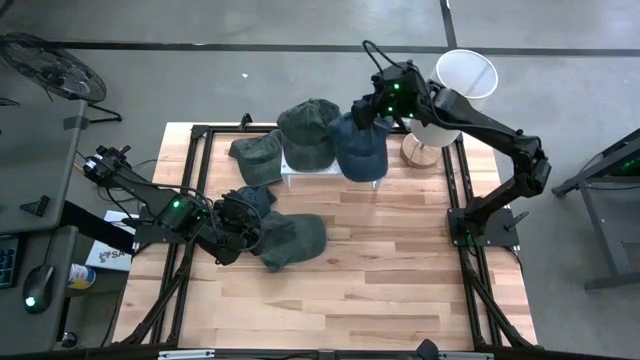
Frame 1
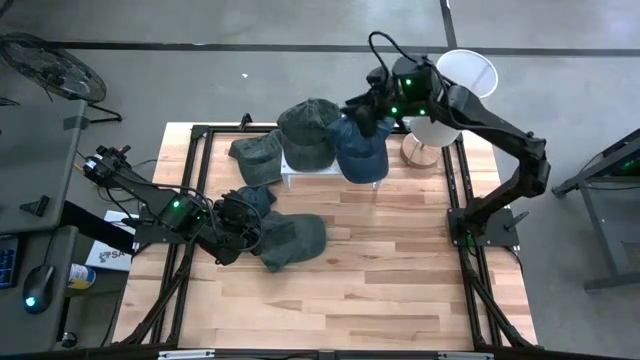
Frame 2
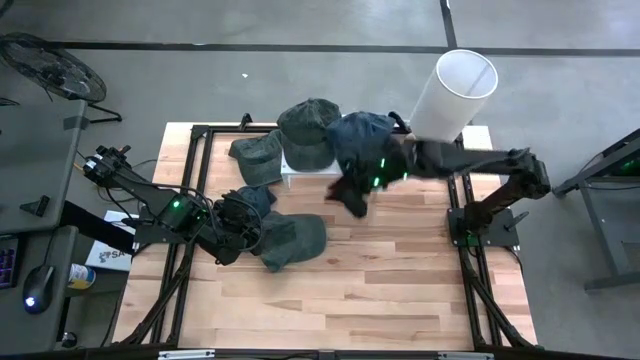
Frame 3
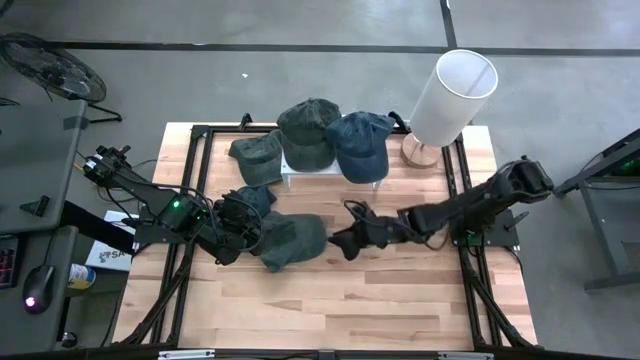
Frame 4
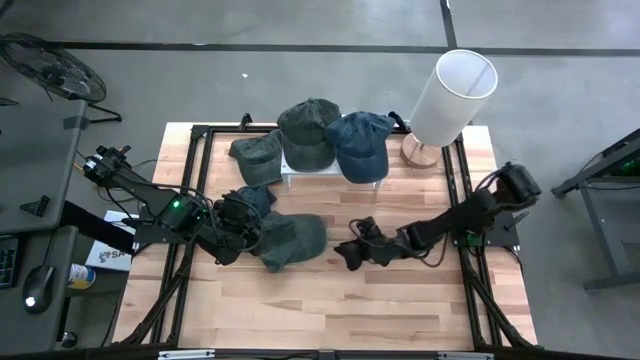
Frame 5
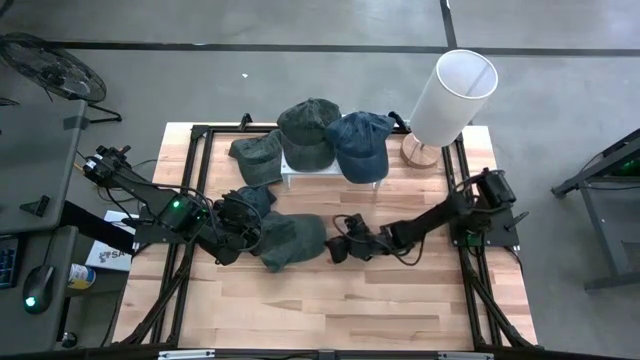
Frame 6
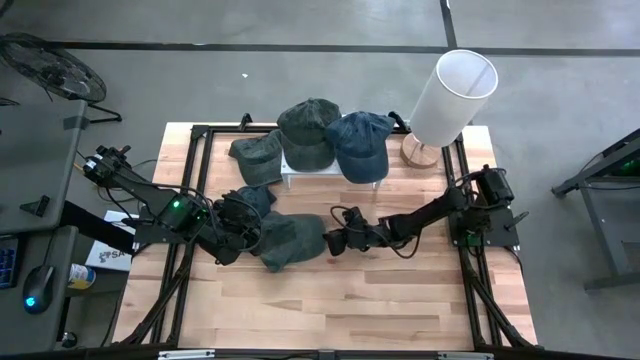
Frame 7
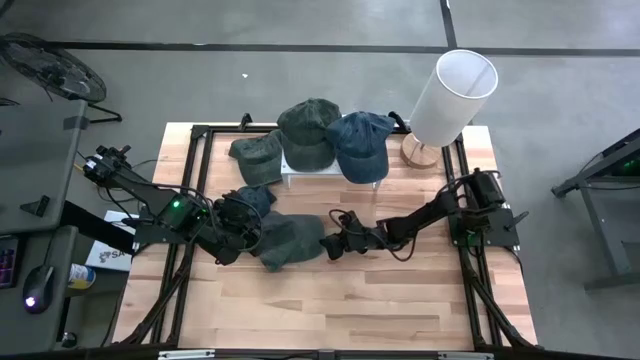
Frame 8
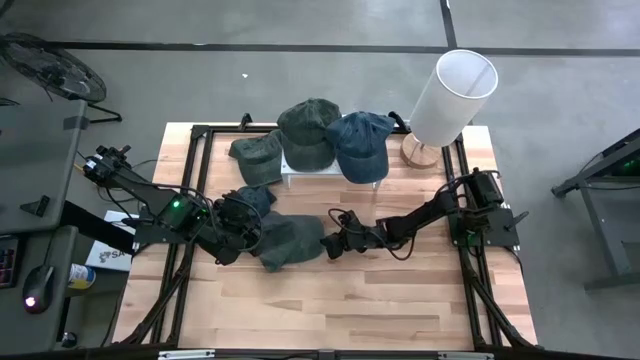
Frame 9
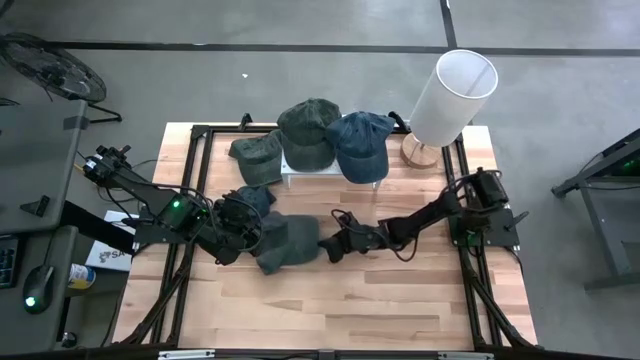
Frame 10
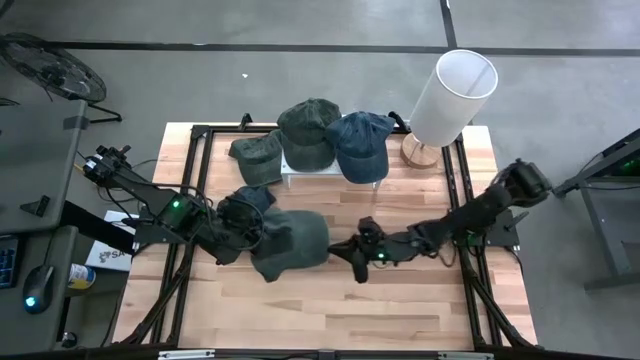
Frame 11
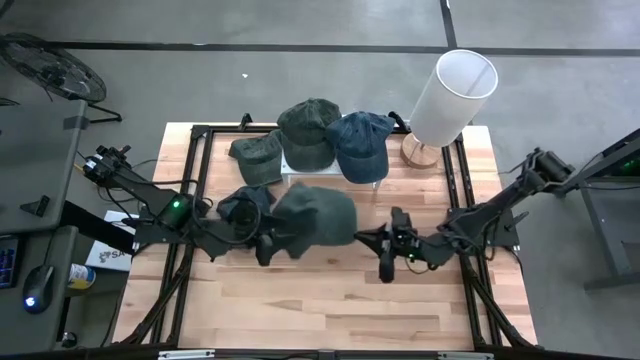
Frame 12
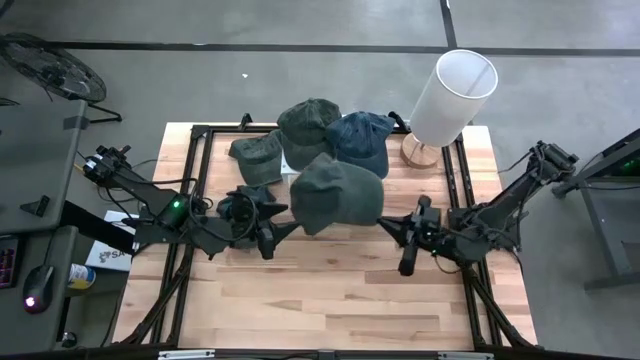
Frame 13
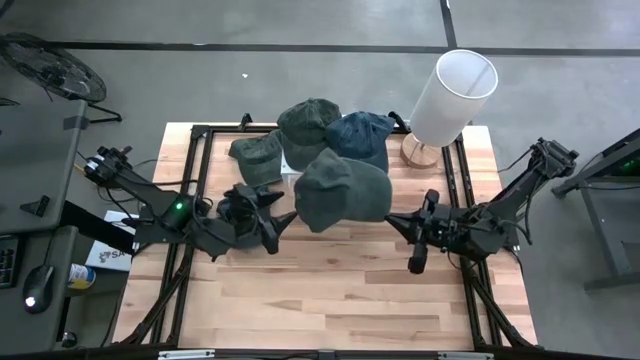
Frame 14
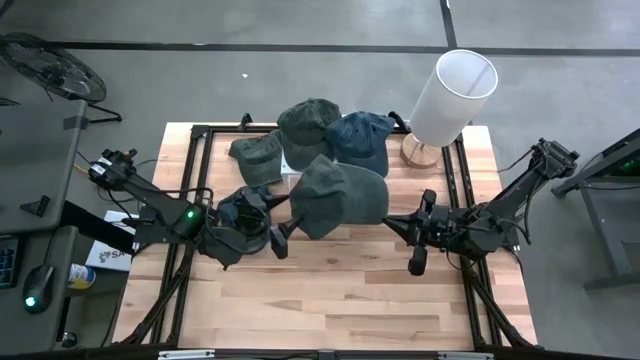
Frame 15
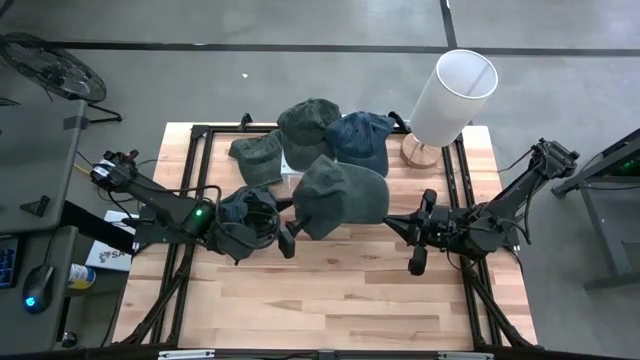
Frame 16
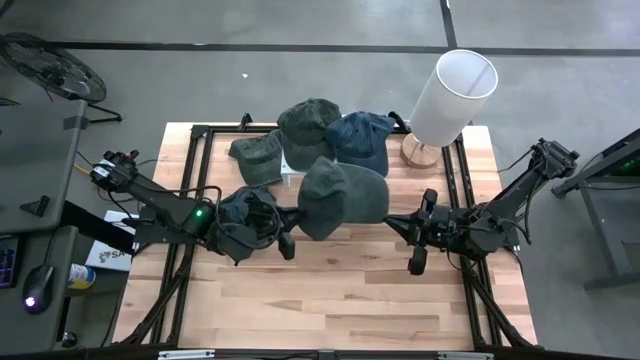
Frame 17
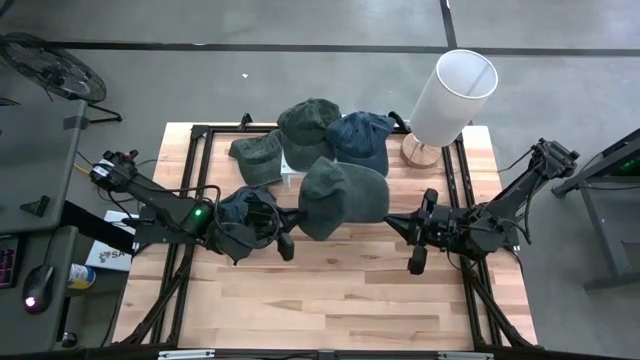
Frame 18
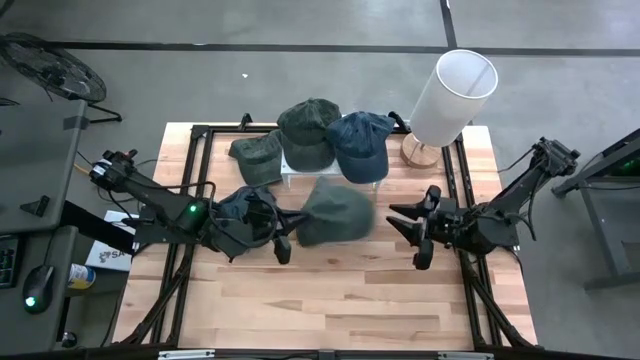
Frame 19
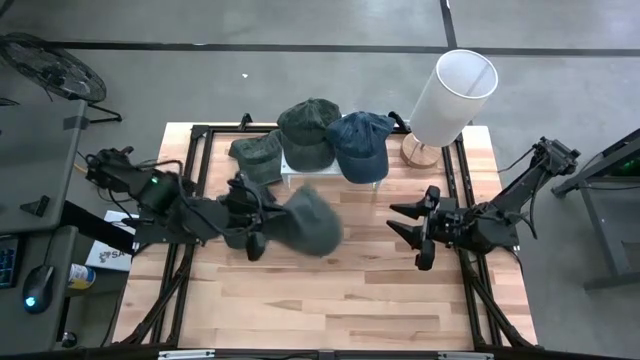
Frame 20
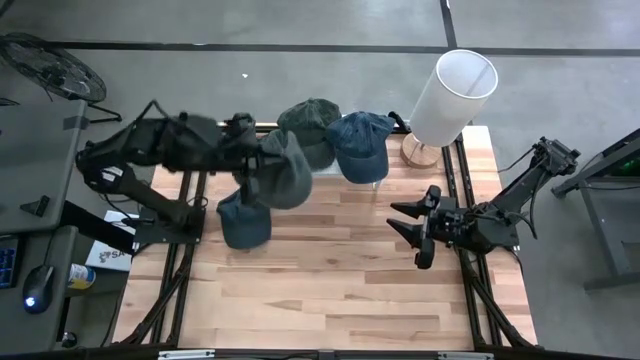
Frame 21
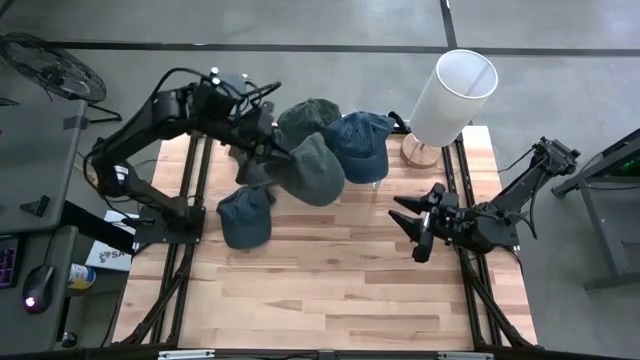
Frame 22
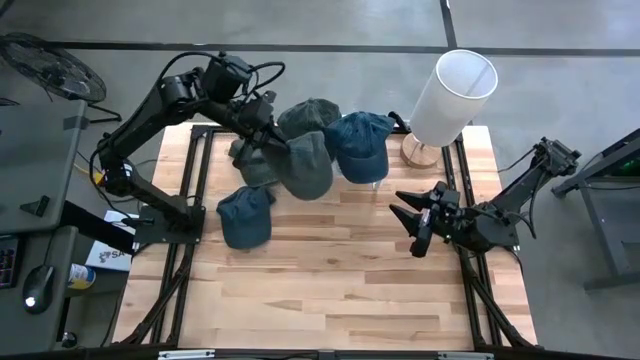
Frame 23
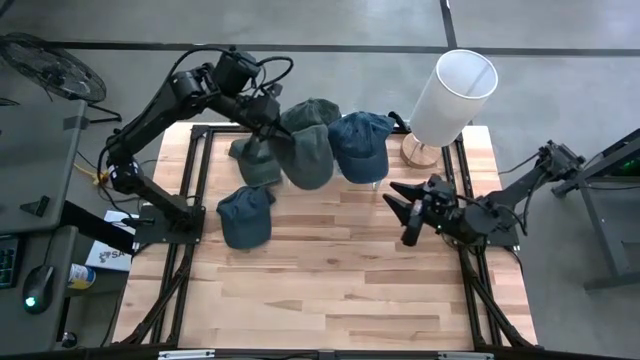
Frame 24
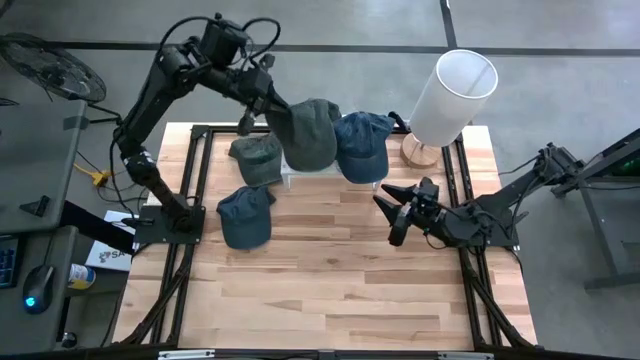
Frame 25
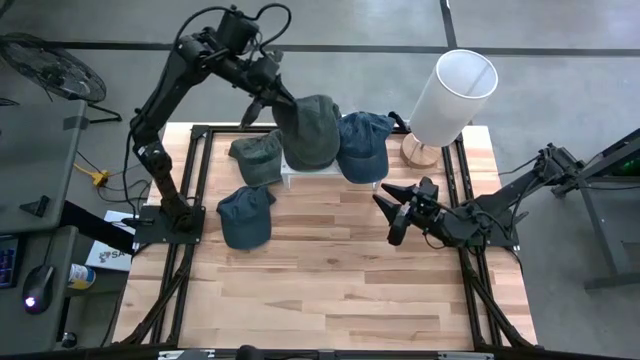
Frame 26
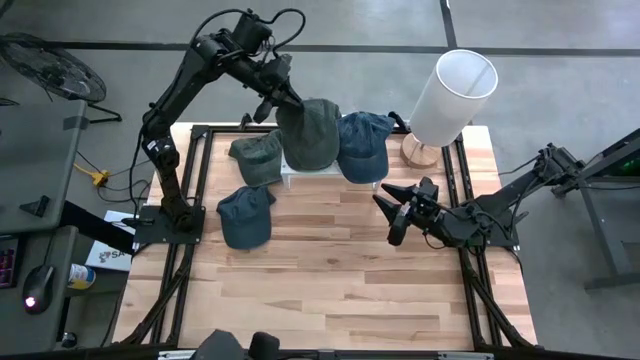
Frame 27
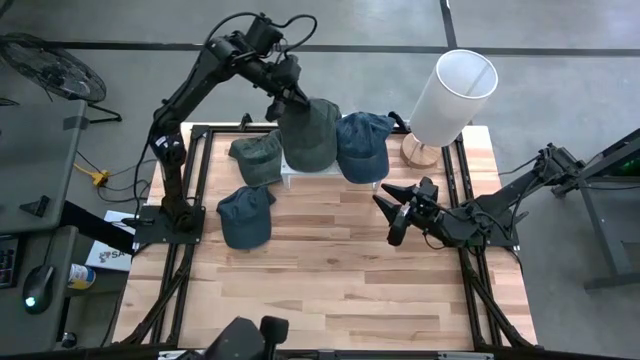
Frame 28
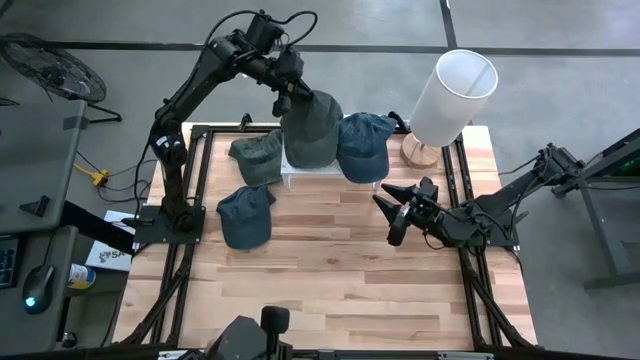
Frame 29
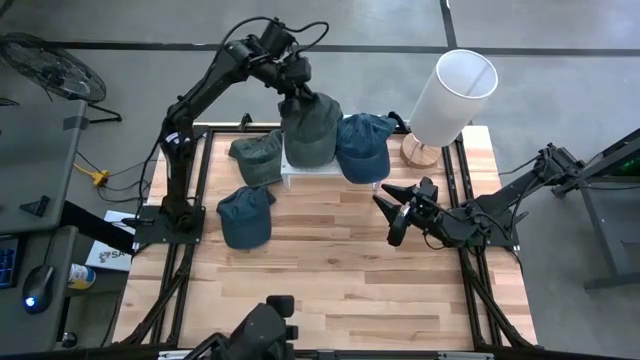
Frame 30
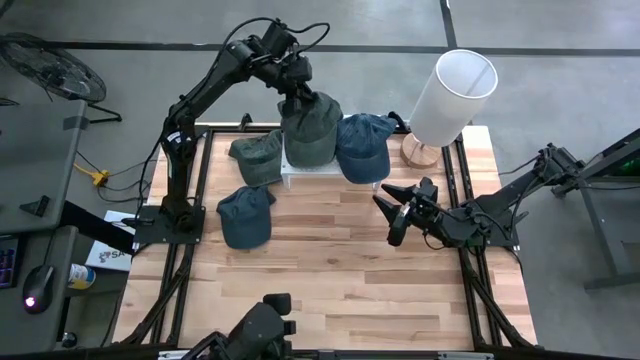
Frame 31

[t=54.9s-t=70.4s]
Task: Pick & Place hat
Stack the dark green cap on the dark green cap on the shelf

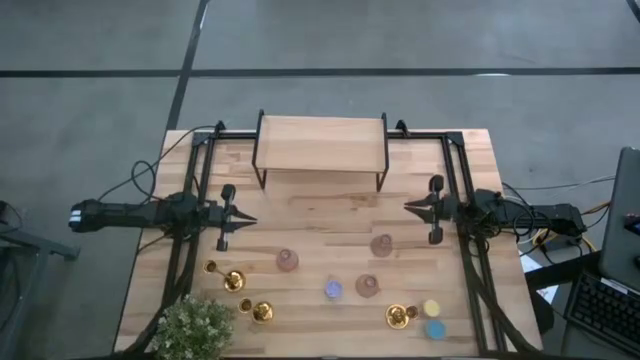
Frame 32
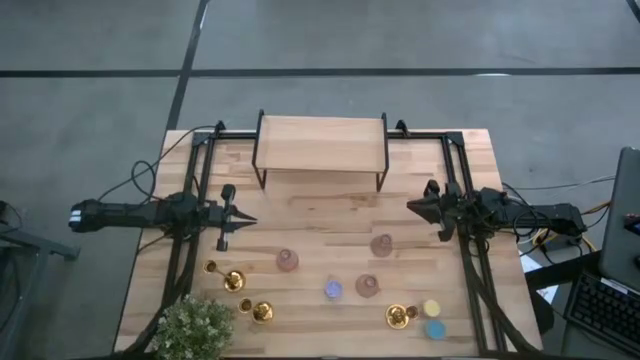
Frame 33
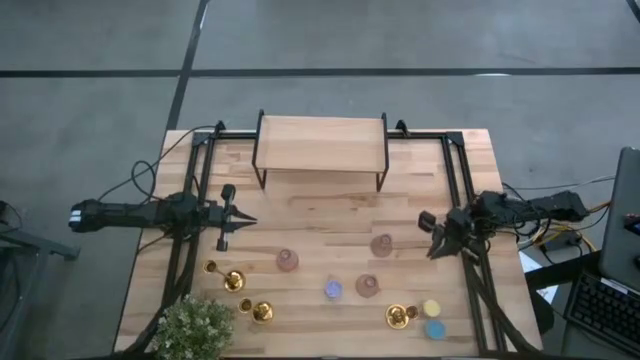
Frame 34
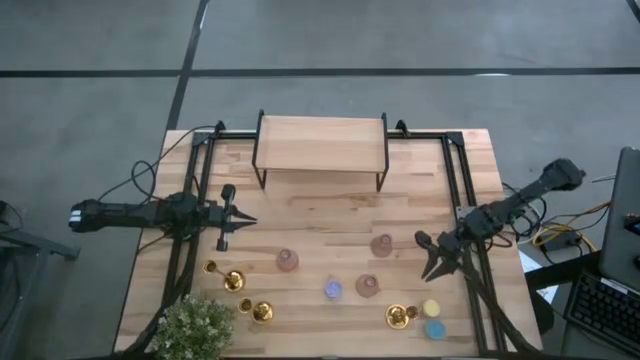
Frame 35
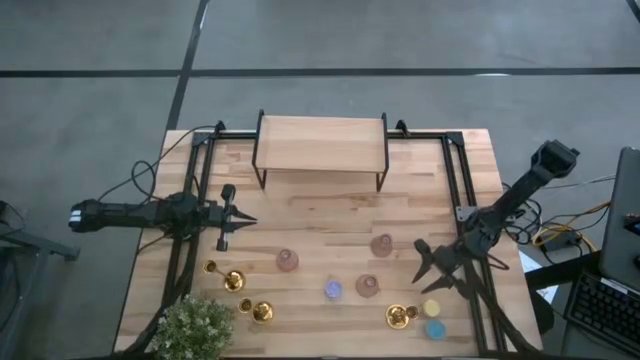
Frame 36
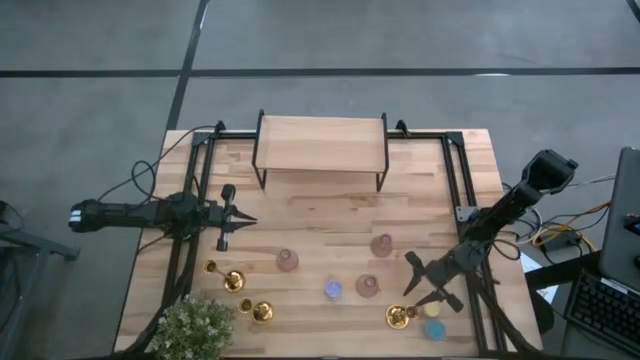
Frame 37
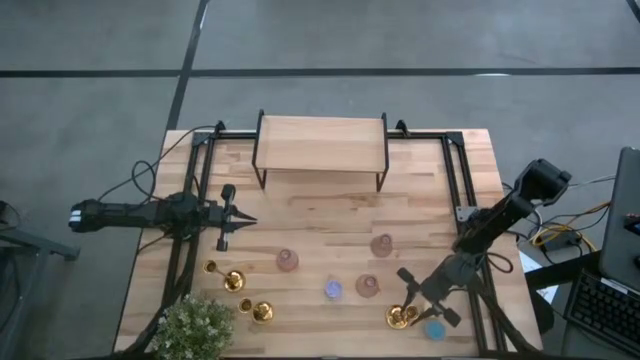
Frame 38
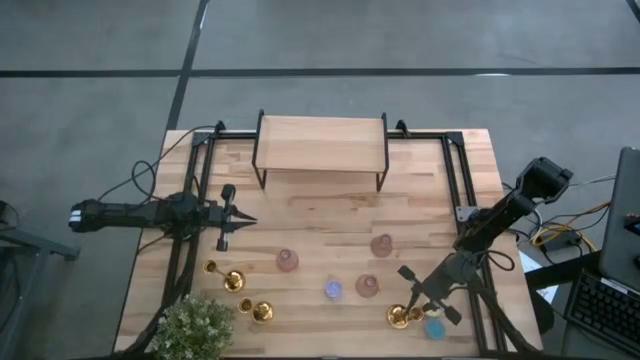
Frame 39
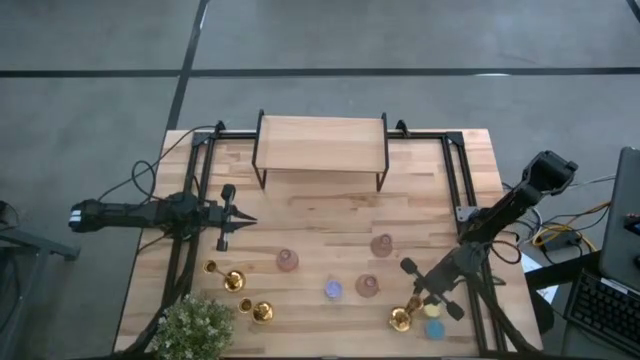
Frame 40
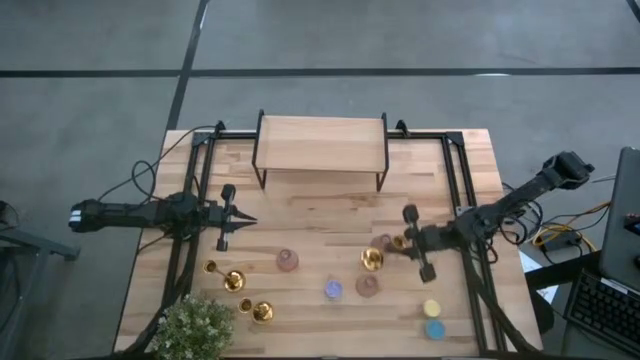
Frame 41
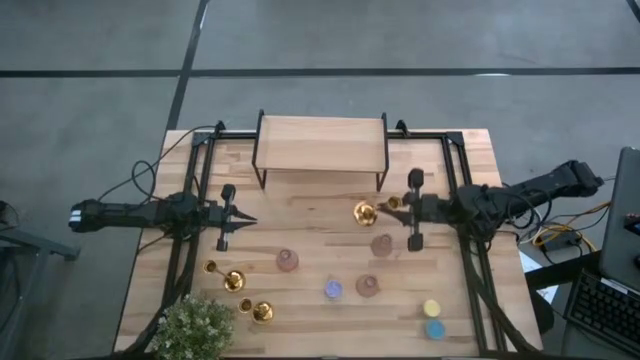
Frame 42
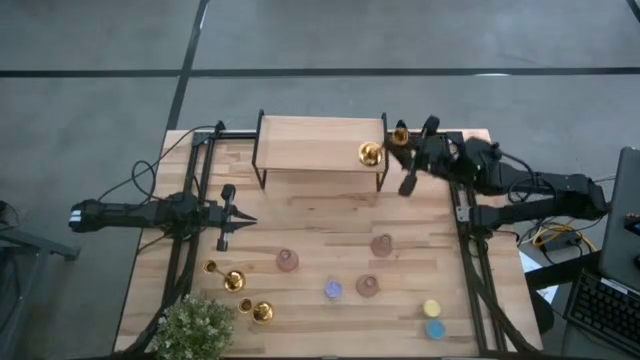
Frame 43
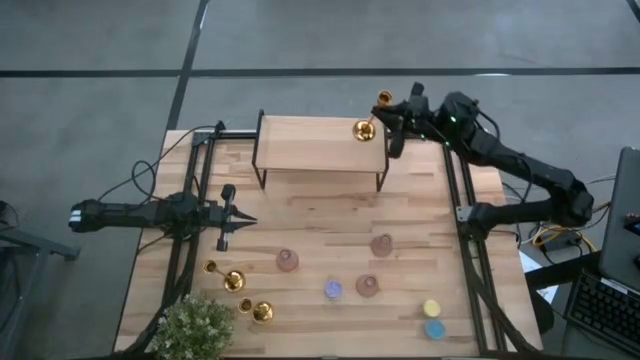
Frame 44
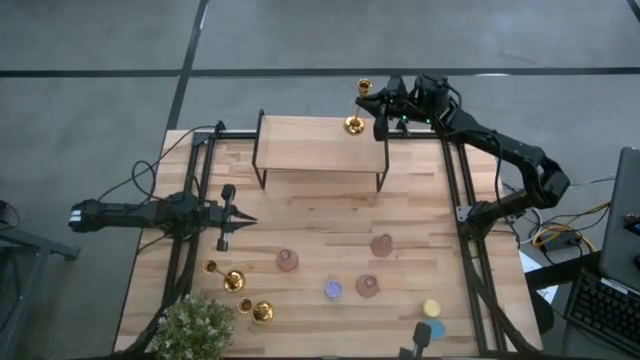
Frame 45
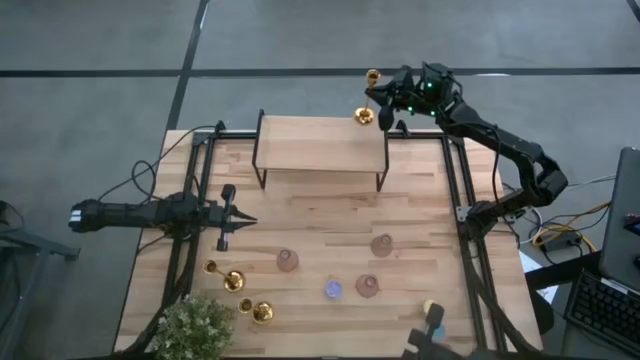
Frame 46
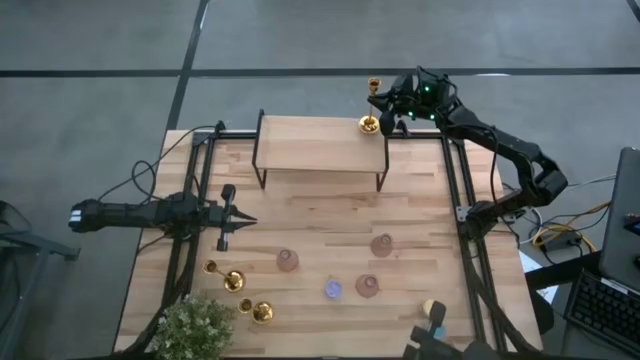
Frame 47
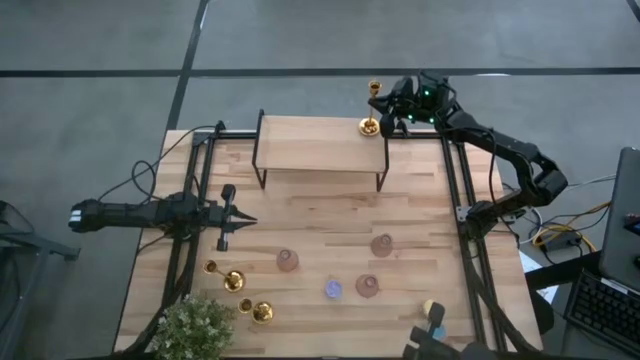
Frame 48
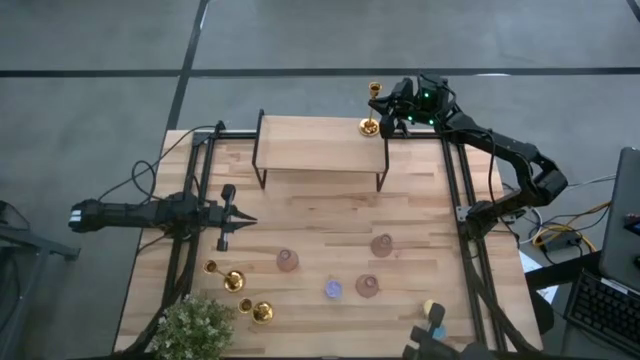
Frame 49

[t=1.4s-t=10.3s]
Task: Pick & Place candle stick holders
Put the bottom right gold candle holder on the shelf
